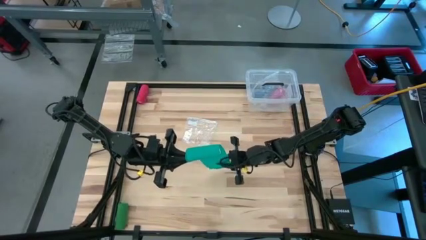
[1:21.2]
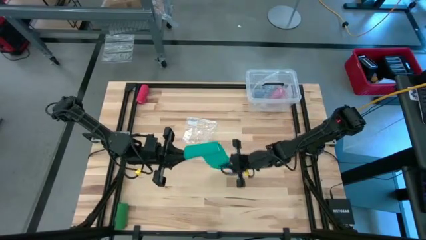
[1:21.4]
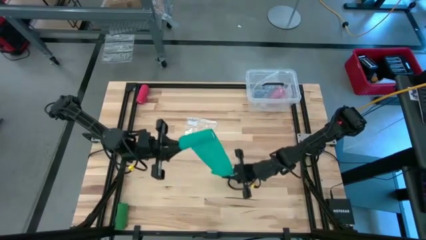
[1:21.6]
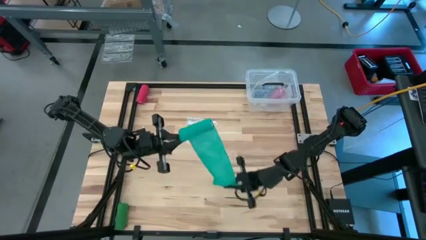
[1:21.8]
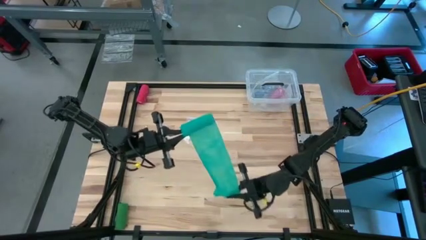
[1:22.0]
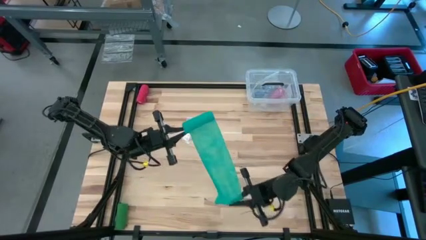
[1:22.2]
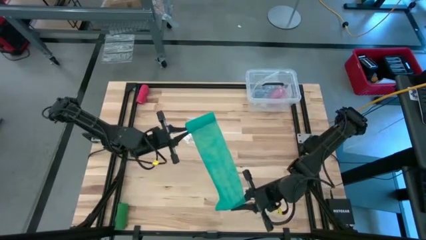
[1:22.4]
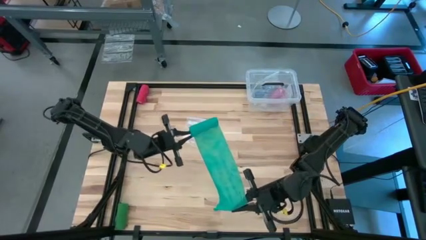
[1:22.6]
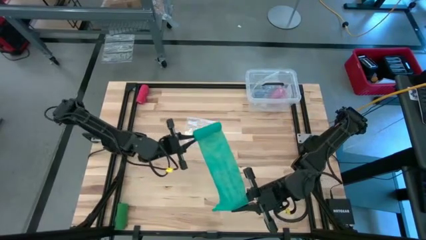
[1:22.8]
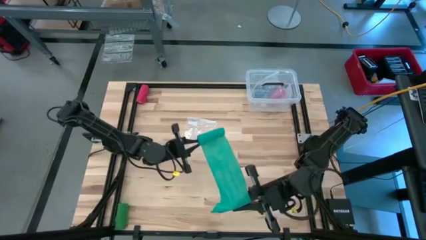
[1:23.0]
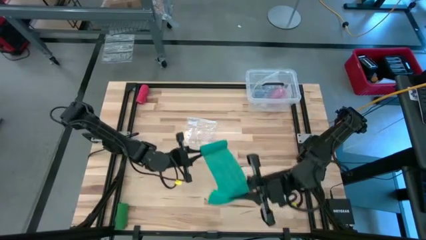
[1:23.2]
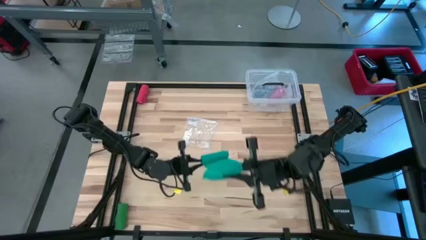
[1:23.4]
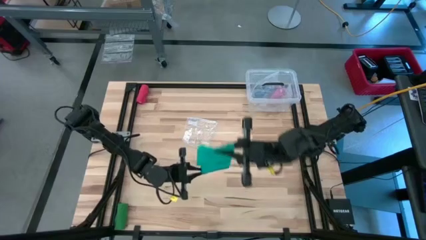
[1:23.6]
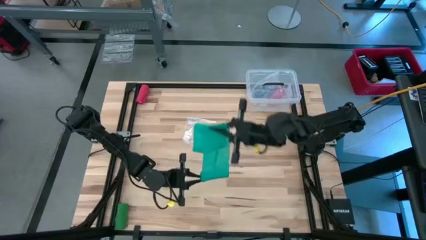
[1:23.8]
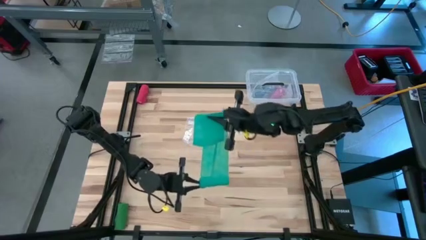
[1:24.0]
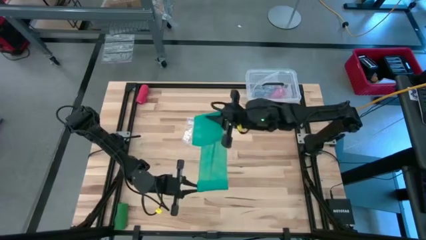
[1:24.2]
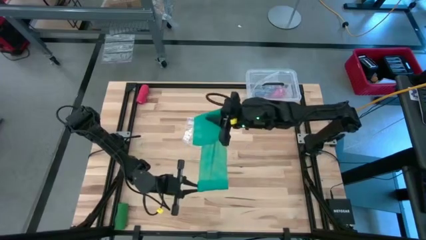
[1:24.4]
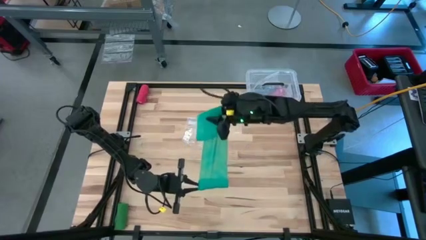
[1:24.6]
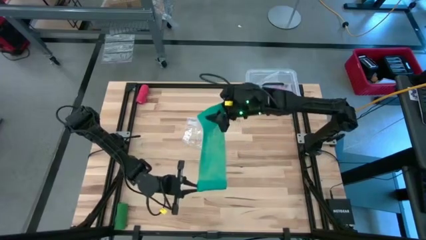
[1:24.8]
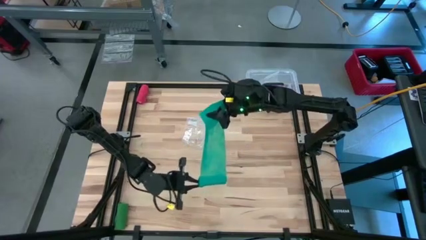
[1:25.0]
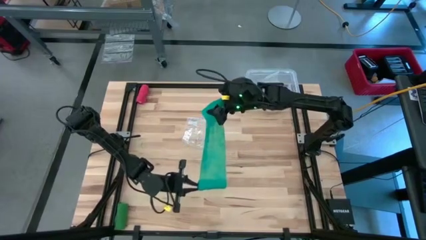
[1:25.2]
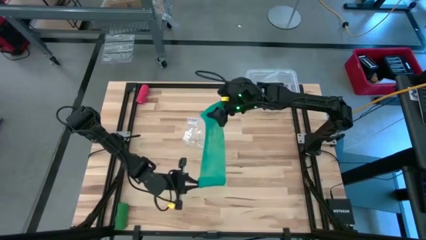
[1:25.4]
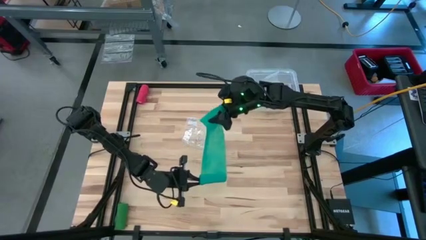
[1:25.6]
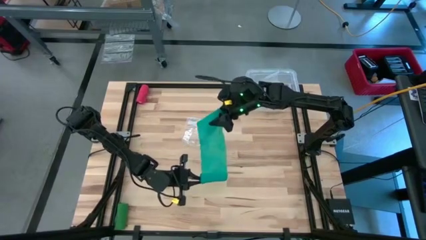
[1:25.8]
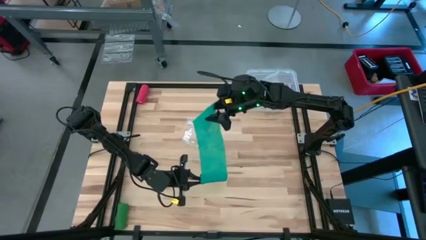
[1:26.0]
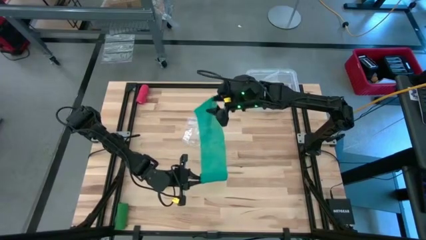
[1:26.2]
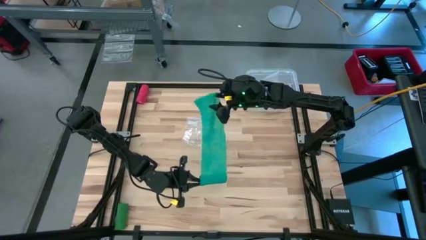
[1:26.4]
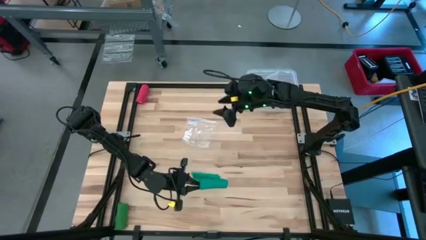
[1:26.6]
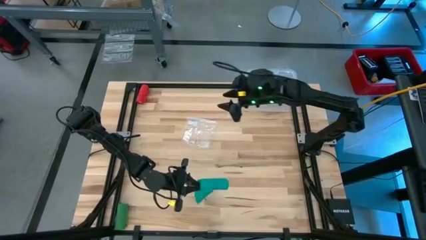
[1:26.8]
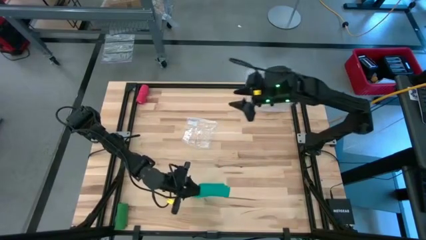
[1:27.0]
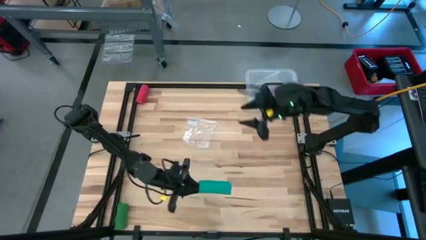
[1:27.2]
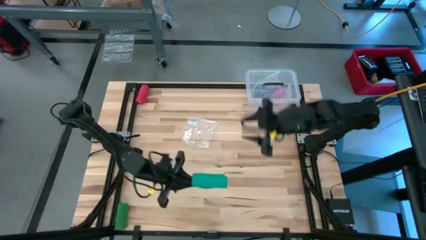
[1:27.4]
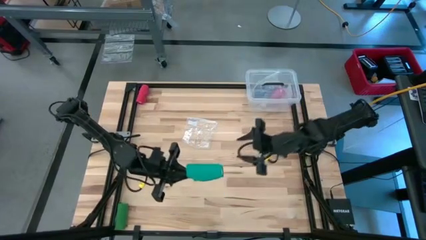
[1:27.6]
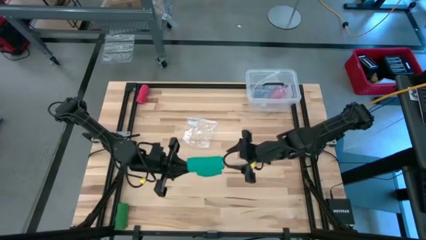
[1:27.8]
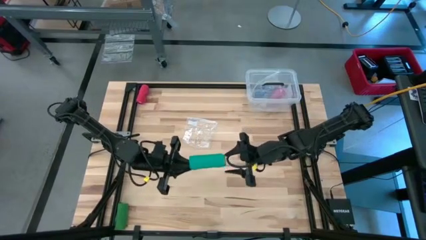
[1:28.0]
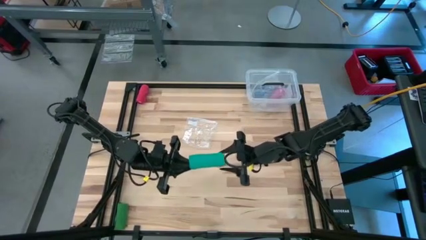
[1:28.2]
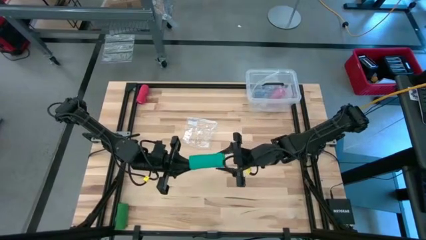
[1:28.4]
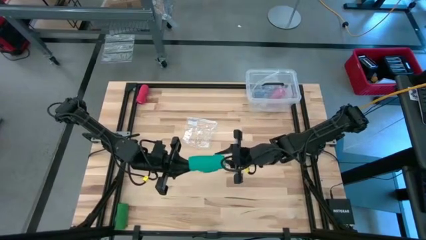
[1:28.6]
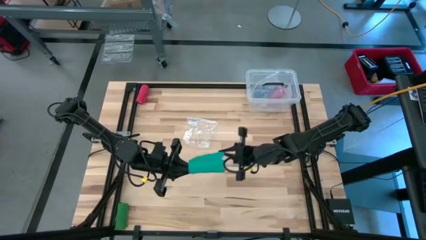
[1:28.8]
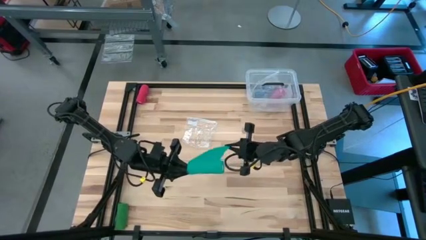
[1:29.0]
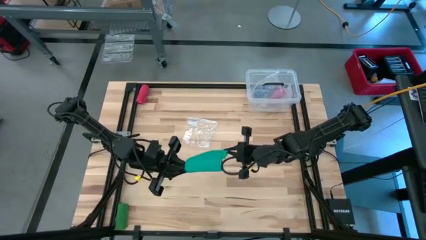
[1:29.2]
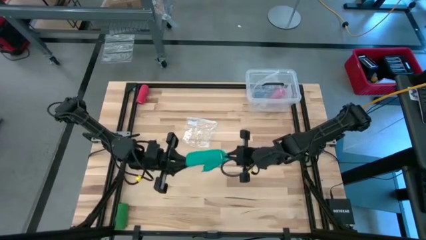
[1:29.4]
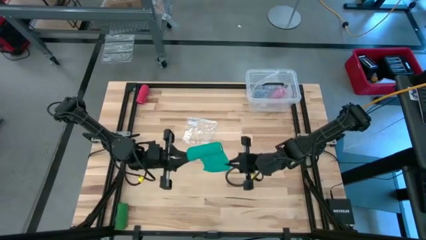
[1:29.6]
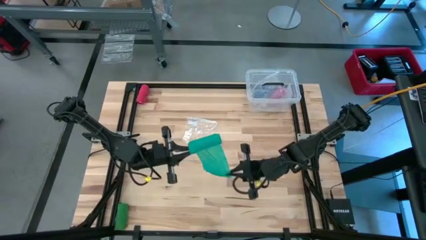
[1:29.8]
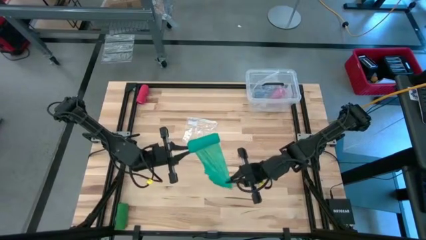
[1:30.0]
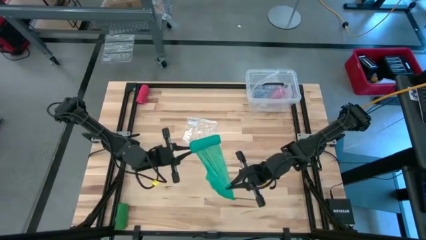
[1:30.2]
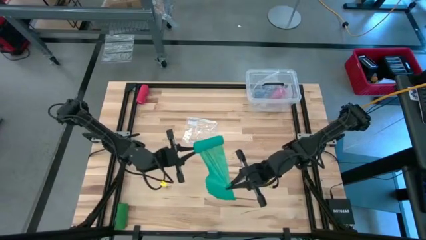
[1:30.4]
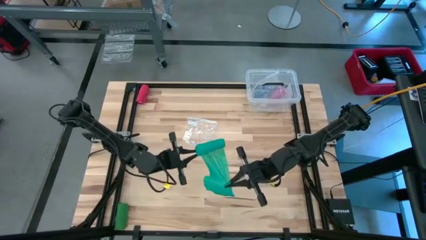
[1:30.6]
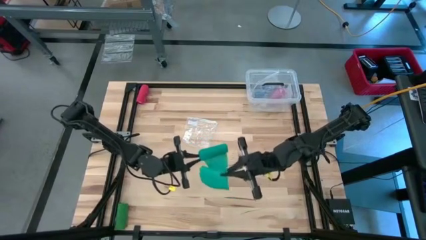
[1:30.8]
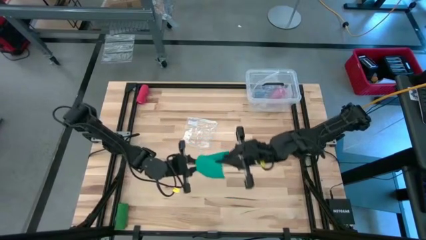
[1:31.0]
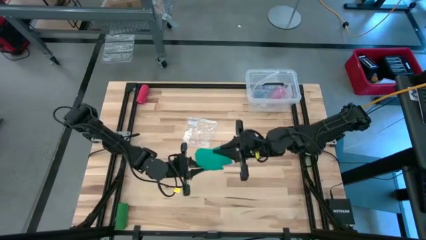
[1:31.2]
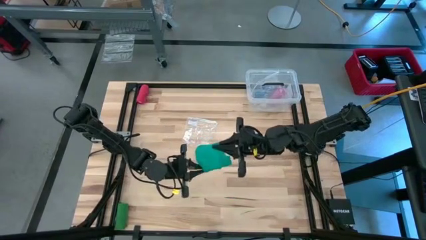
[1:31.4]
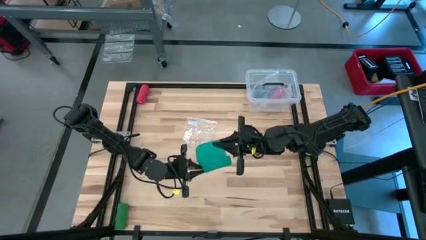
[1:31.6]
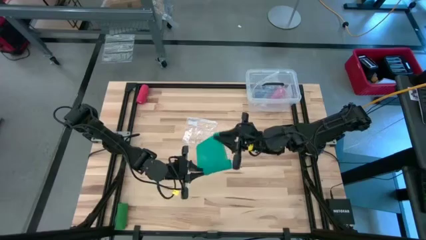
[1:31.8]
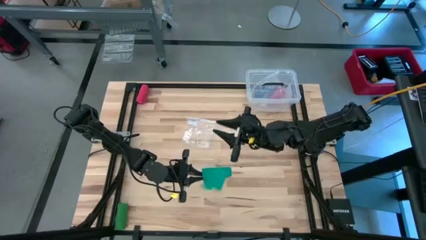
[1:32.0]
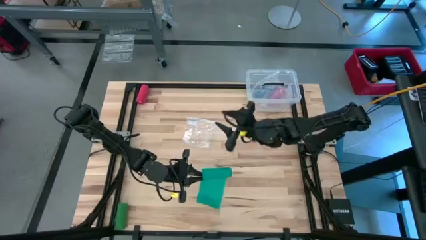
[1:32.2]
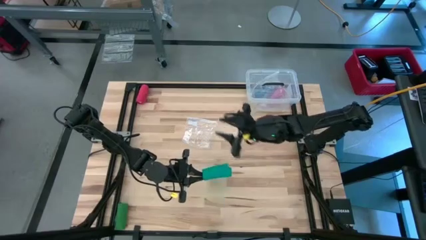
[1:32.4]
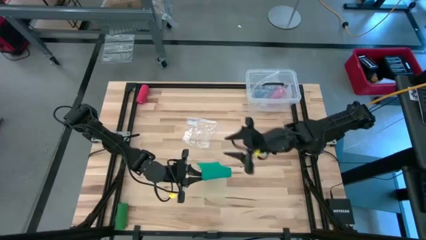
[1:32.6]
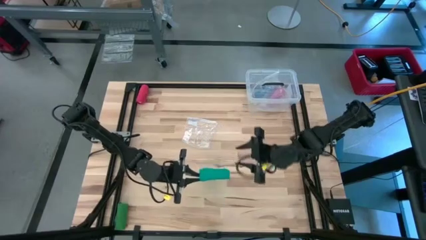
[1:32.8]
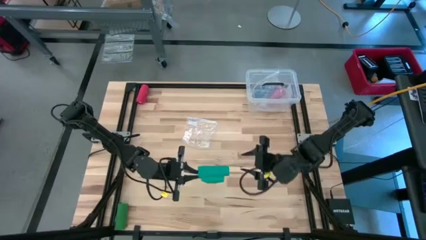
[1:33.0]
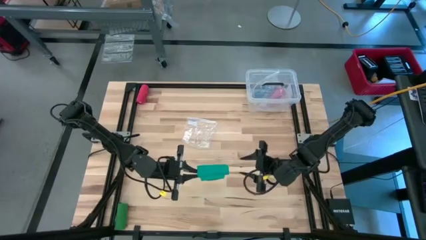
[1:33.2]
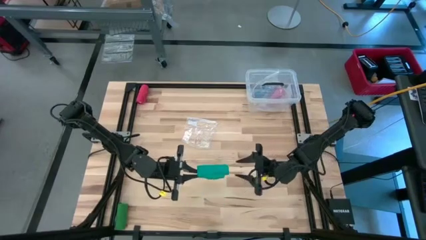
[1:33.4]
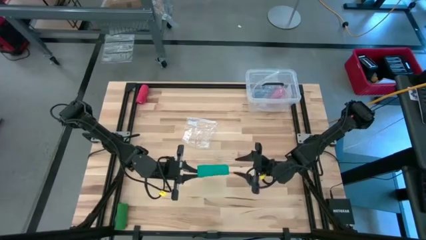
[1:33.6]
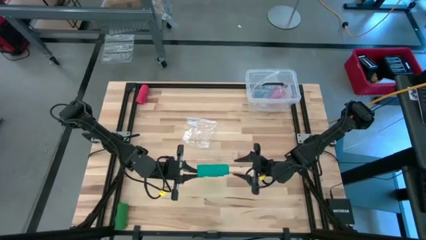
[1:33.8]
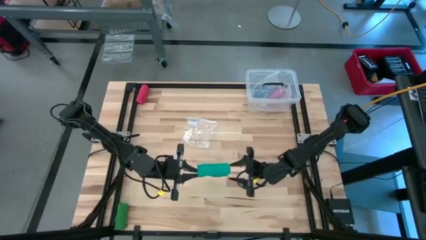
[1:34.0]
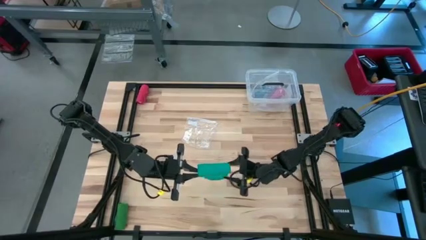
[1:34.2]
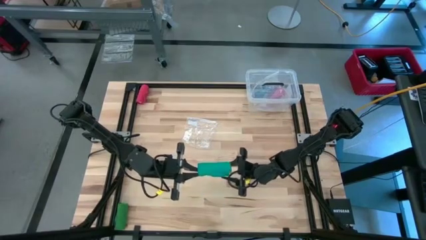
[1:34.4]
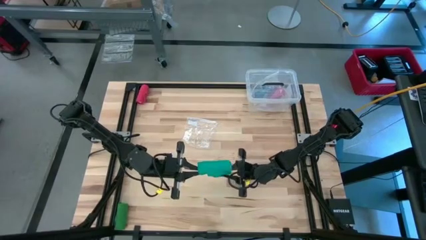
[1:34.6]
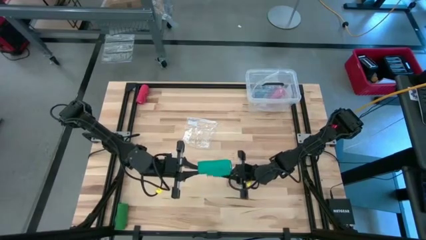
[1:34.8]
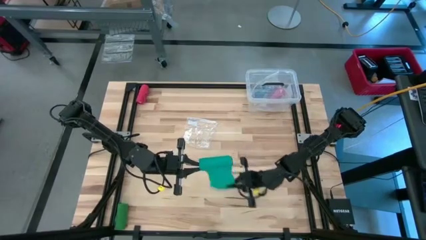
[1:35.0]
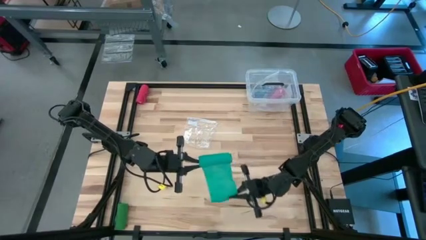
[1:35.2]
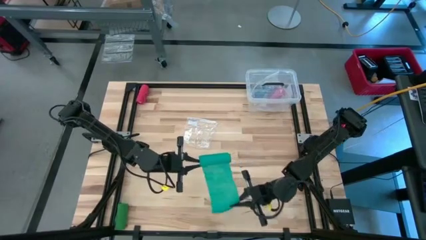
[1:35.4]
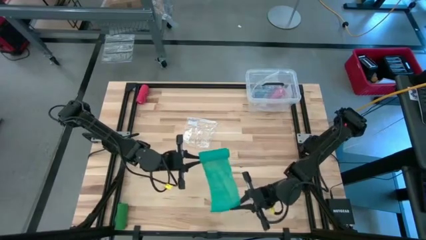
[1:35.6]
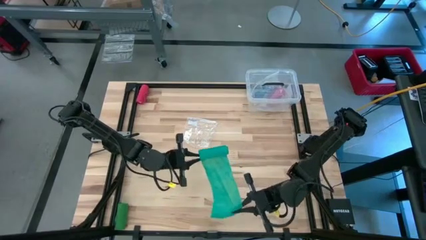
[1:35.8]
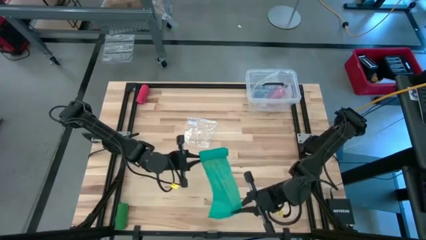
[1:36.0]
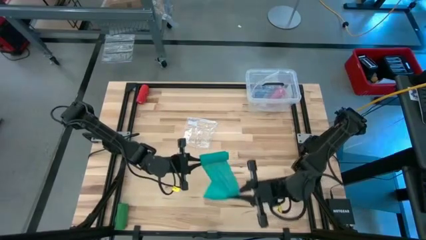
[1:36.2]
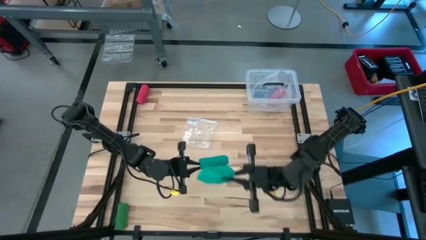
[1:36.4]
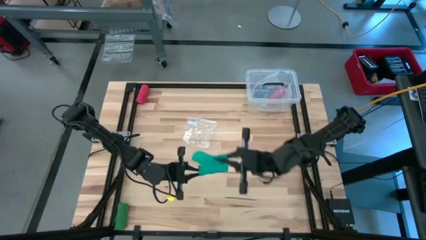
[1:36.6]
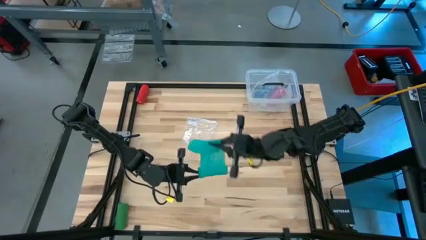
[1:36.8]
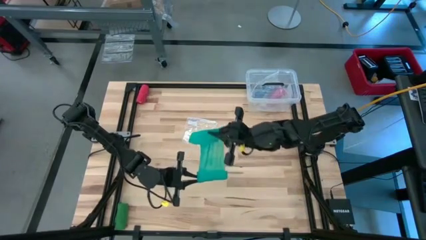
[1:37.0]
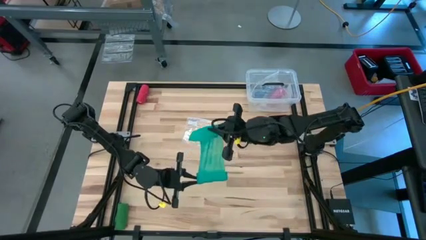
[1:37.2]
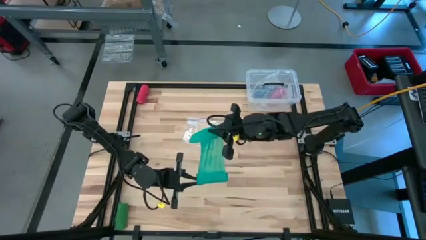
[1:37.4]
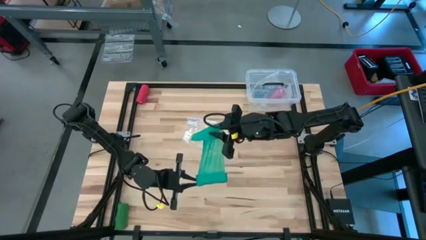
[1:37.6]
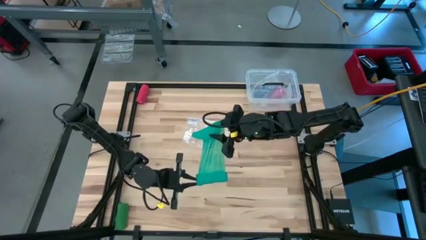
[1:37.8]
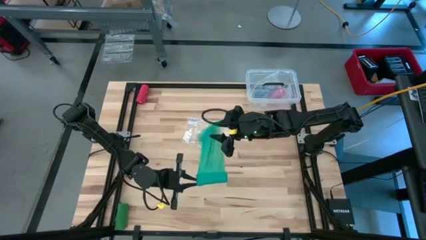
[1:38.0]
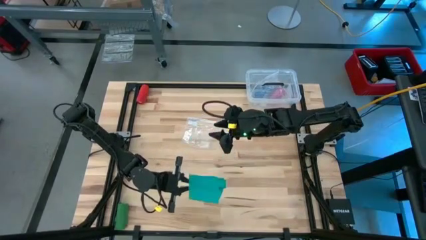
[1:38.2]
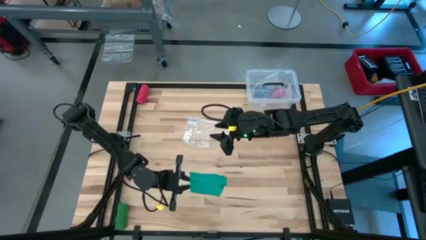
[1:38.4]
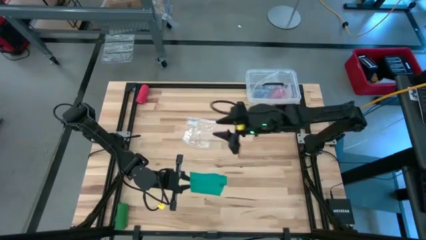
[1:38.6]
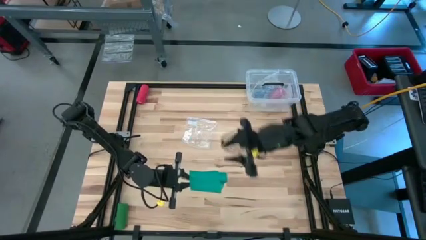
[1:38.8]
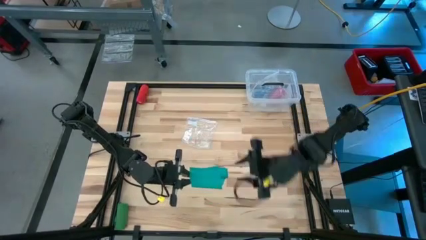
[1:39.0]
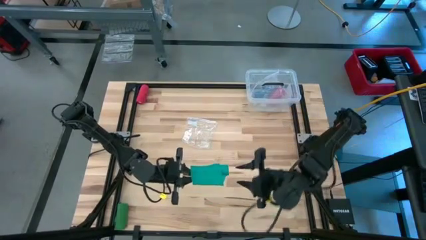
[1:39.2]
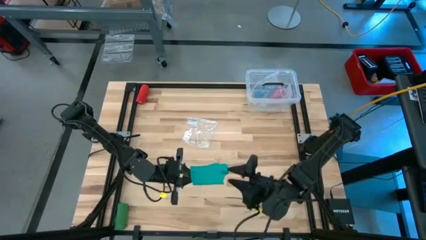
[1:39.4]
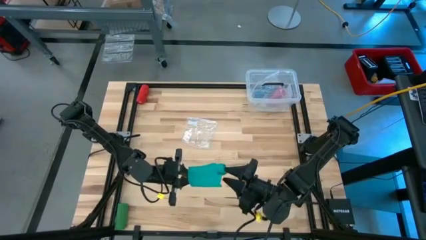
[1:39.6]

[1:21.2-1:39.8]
Task: Roll bandage
Roll the green bandage
